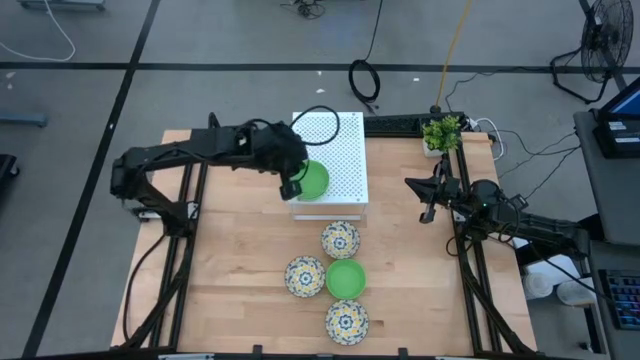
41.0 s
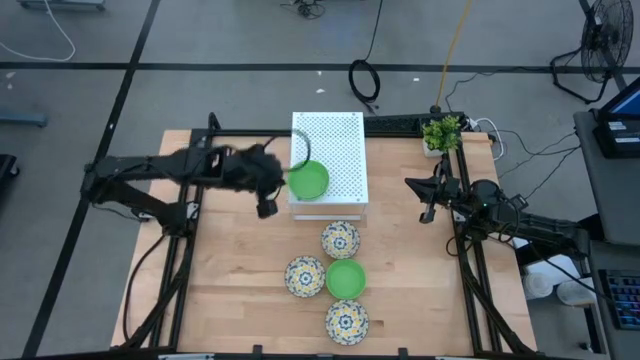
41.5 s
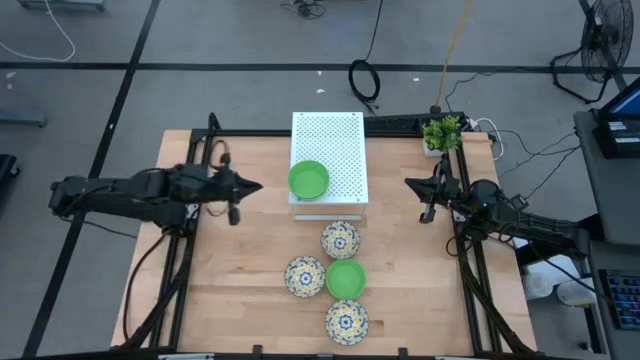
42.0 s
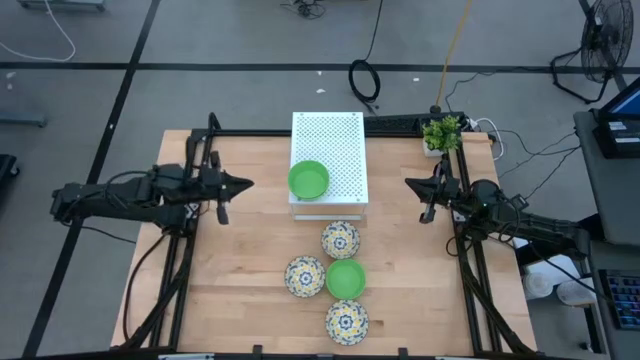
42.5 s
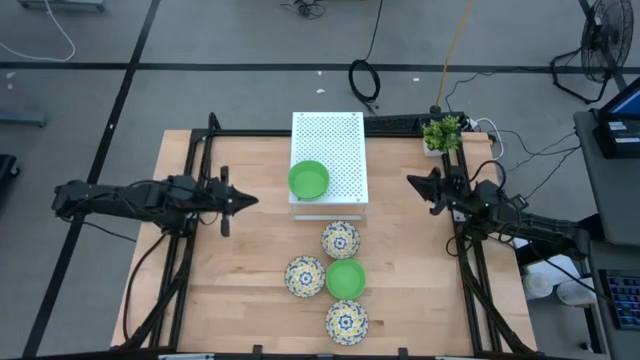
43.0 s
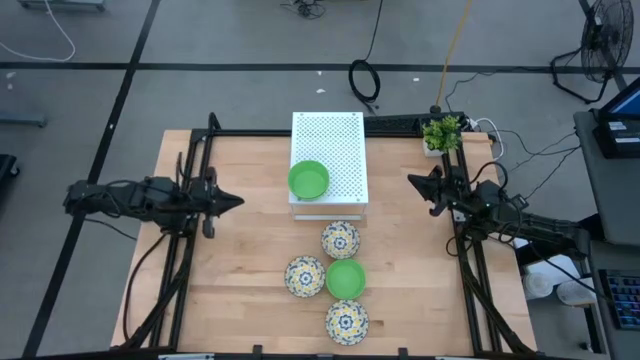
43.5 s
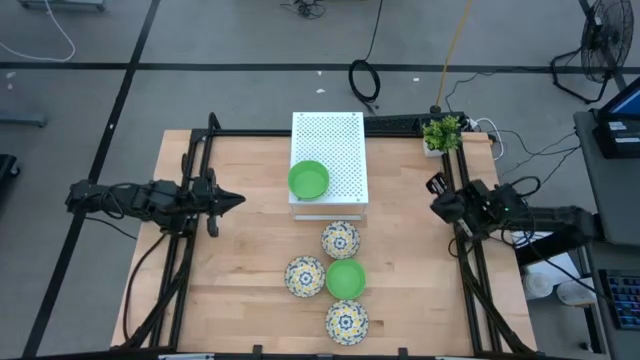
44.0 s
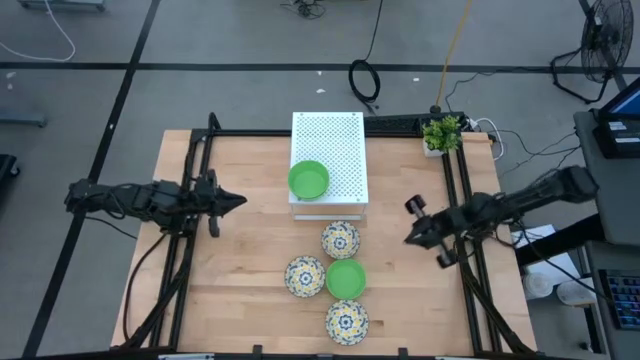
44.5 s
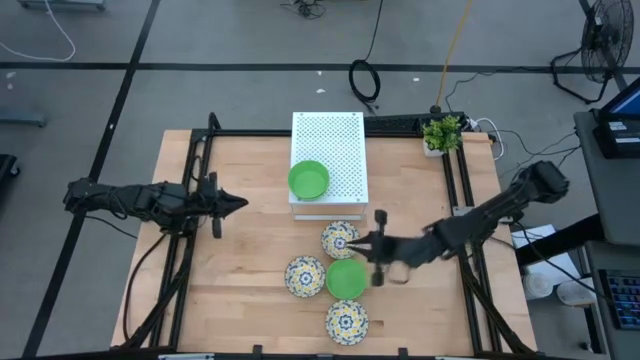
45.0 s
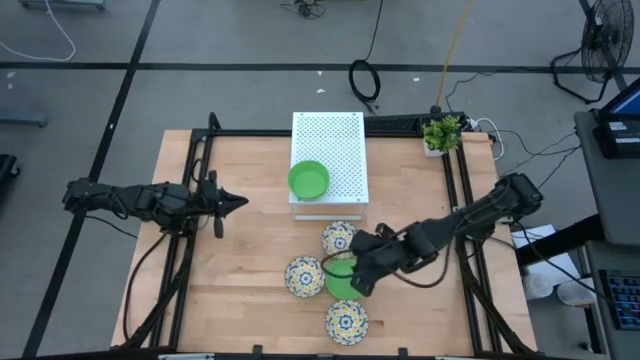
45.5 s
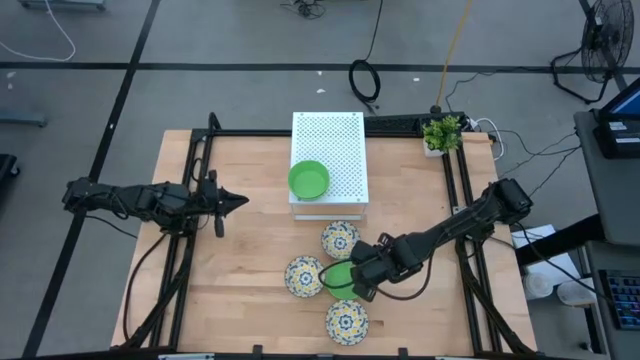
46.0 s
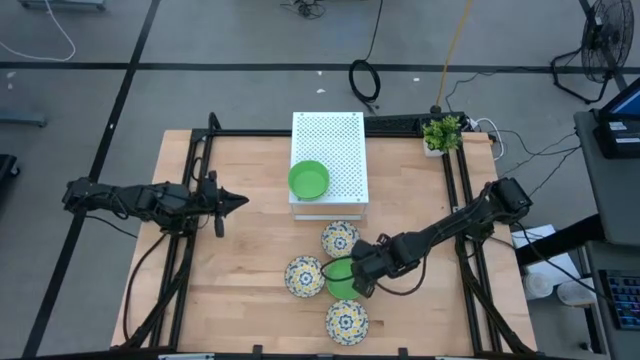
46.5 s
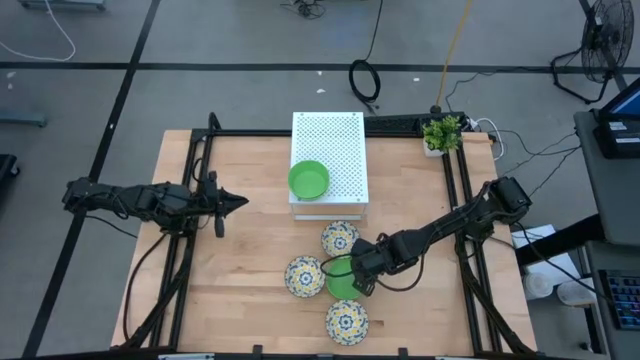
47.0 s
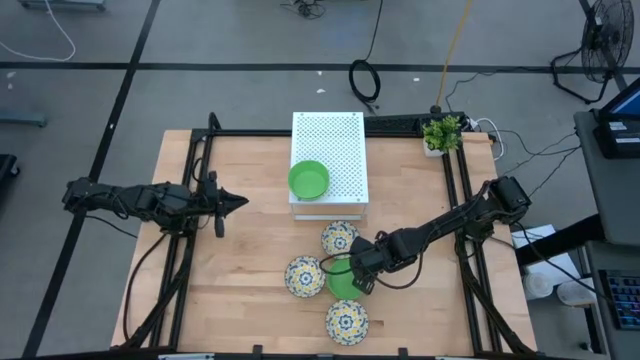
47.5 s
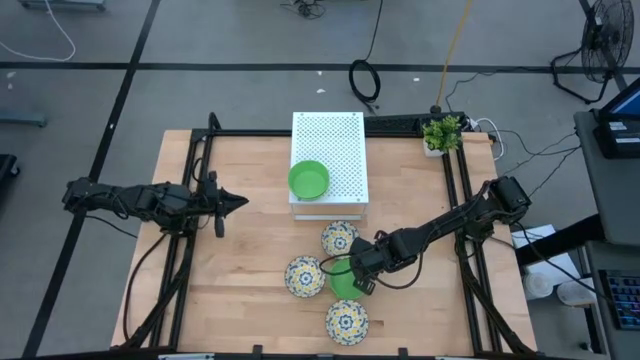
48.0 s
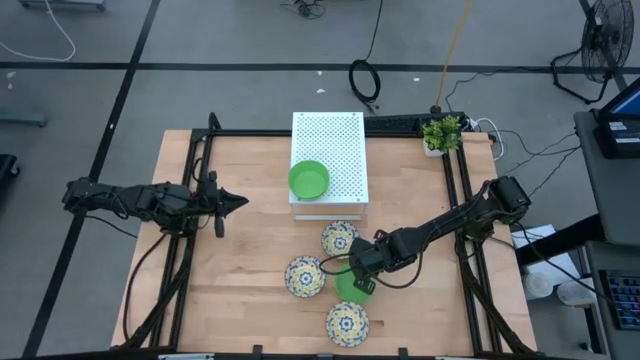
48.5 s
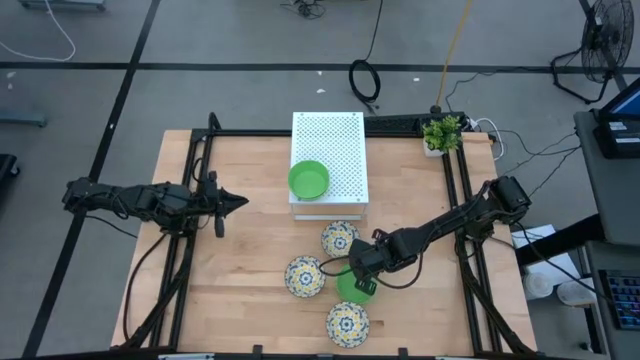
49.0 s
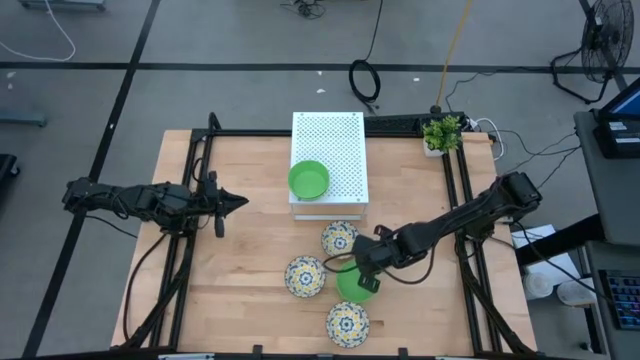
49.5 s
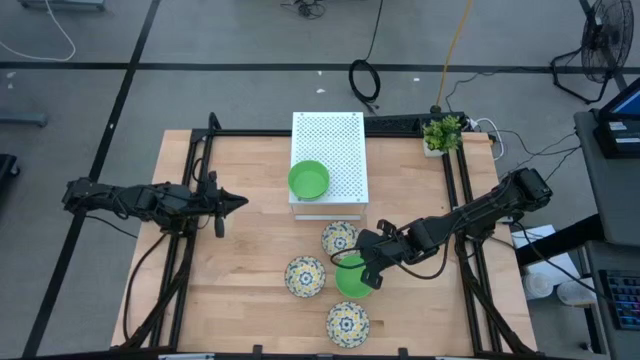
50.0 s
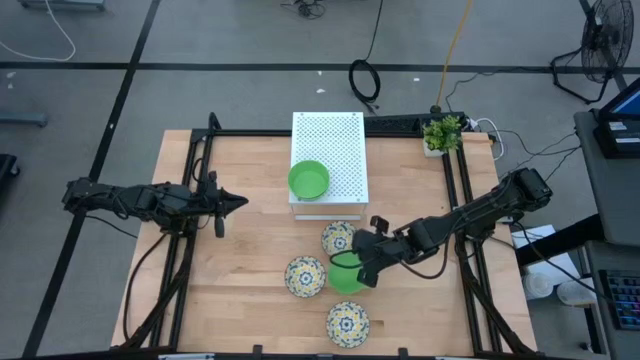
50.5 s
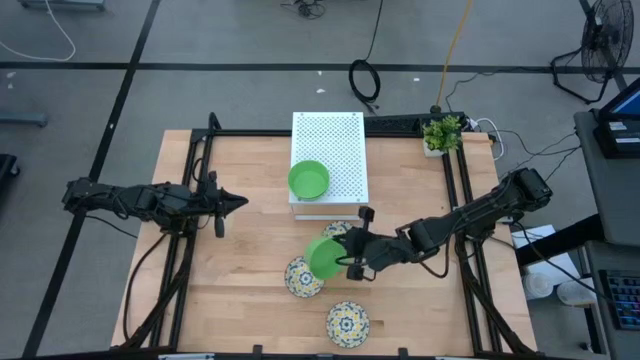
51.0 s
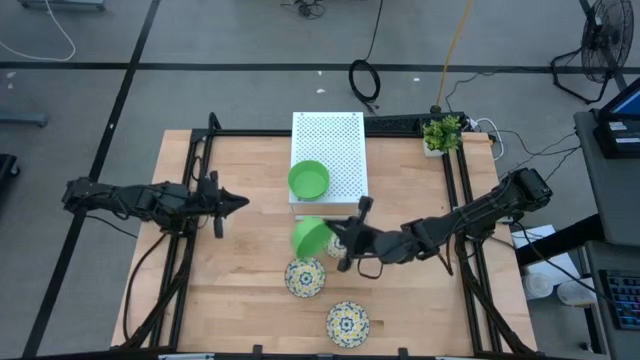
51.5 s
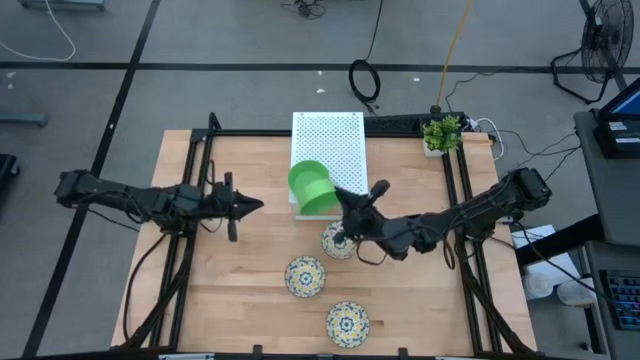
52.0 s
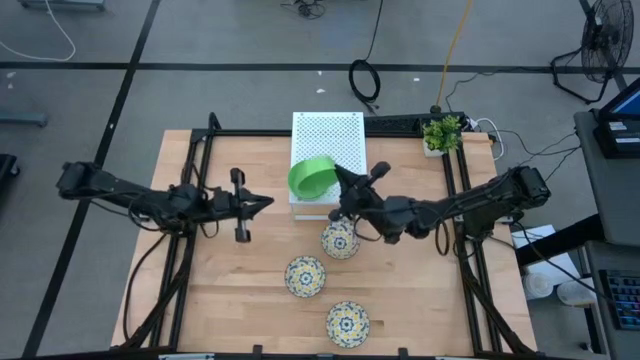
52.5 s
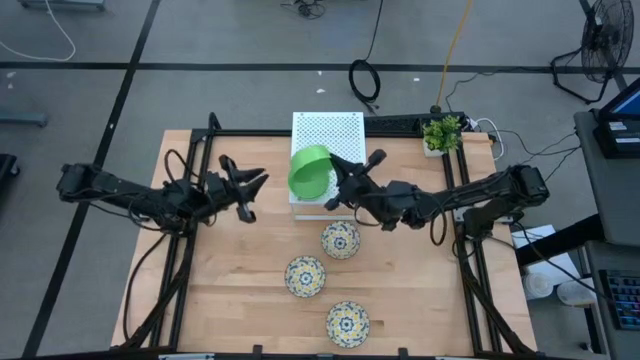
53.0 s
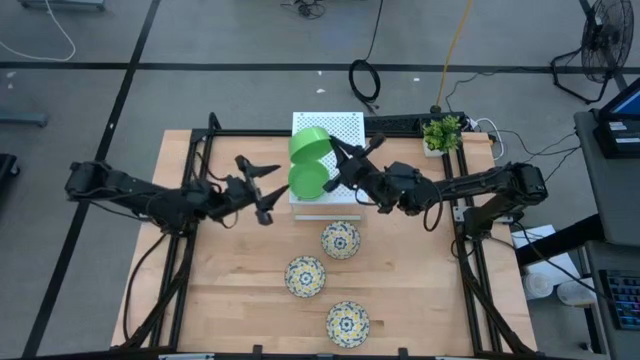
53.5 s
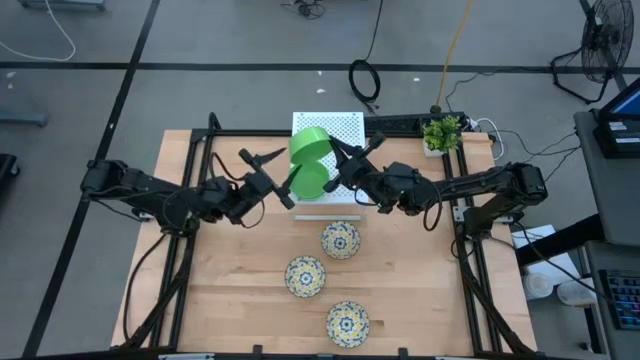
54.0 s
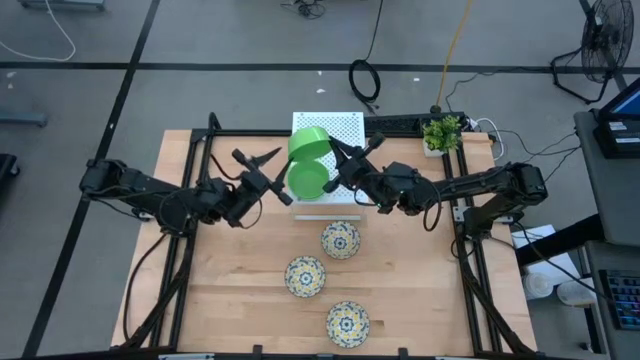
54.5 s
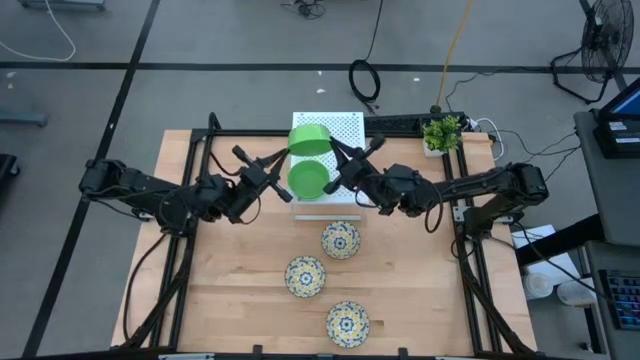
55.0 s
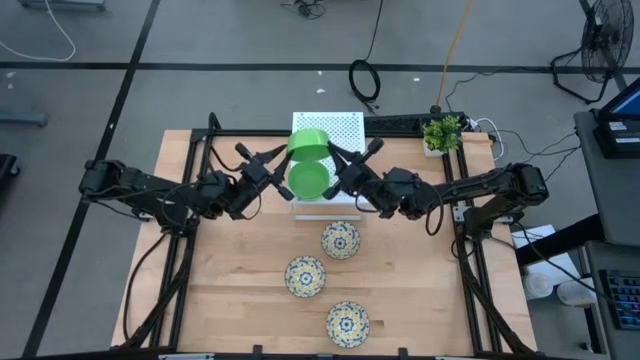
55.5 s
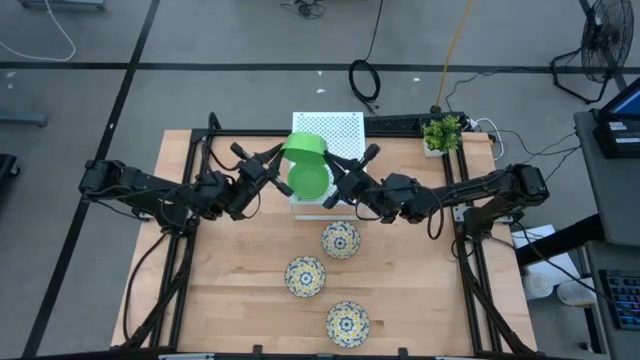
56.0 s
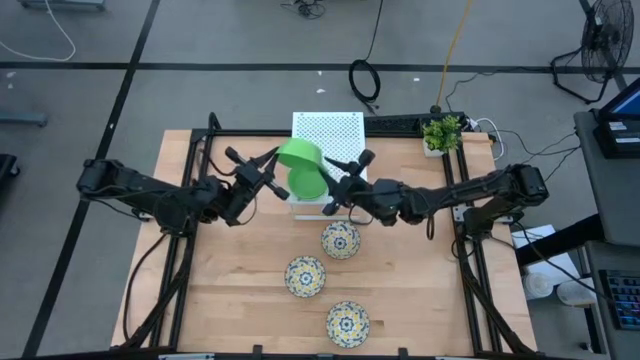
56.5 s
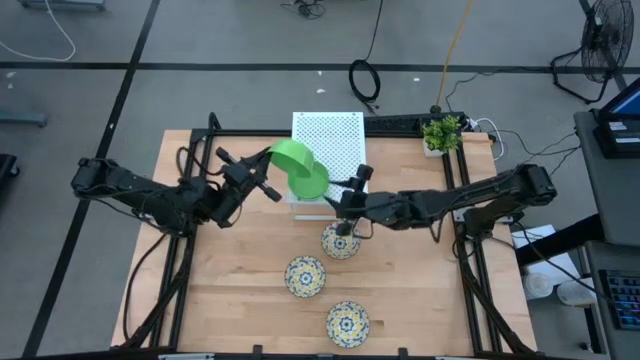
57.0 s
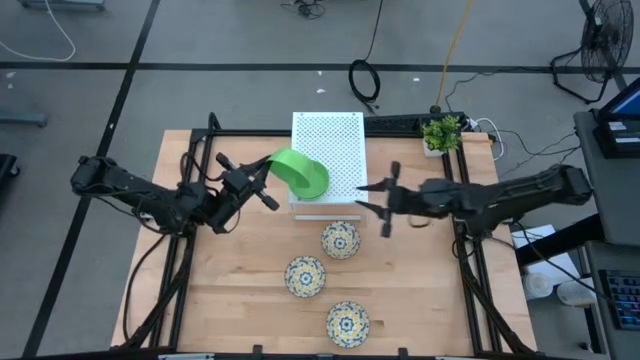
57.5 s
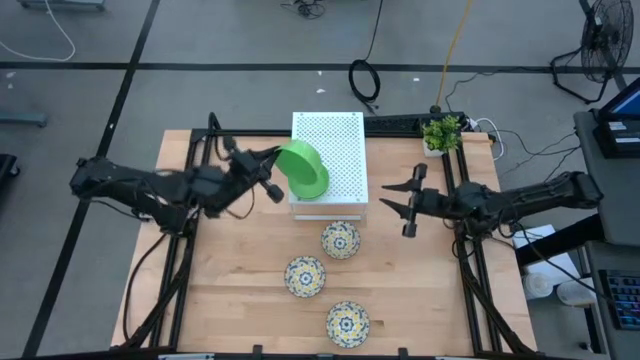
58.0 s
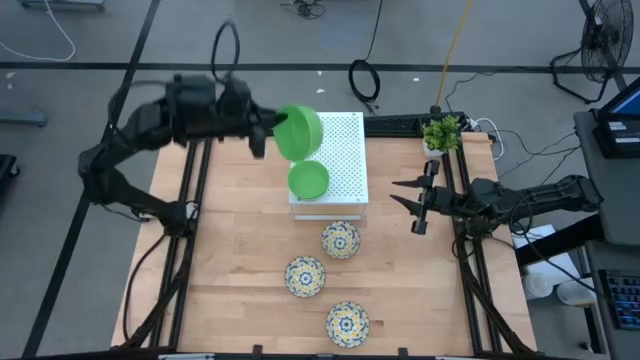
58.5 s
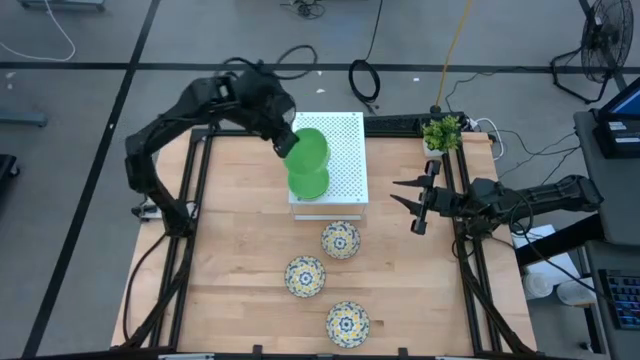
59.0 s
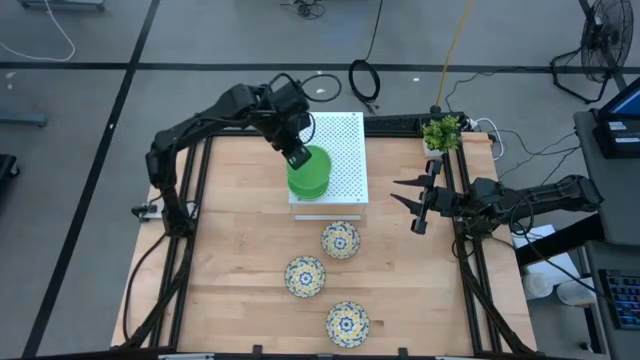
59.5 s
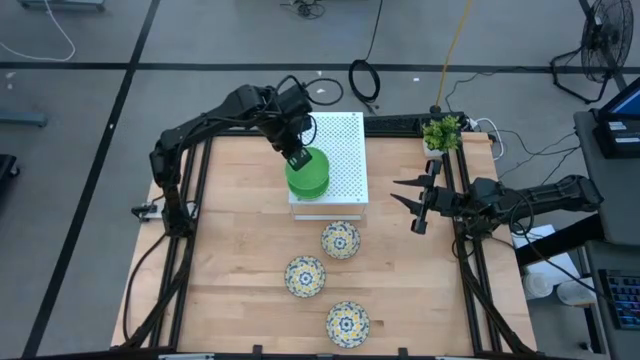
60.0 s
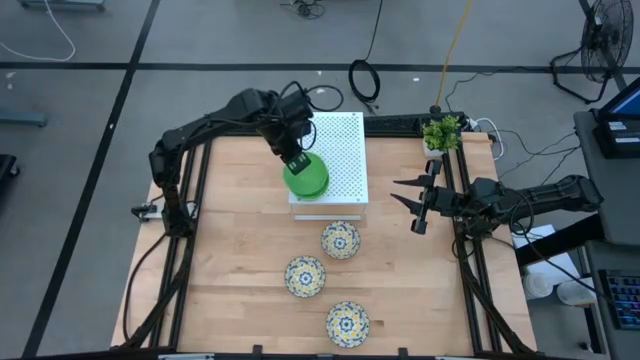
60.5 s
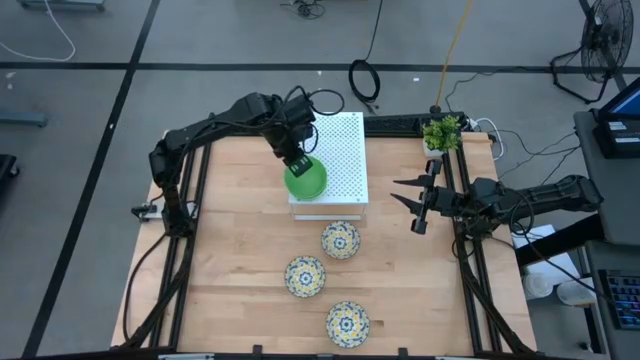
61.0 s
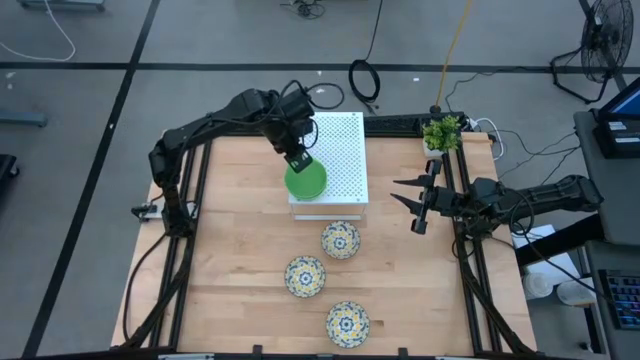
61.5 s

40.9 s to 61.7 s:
Task: Pick & Place Mini bowls
Stack the green bowl on the shelf
